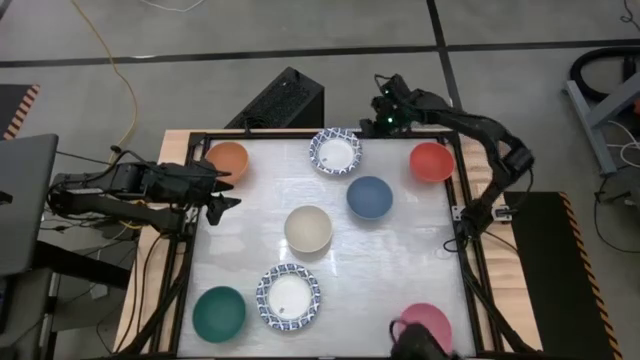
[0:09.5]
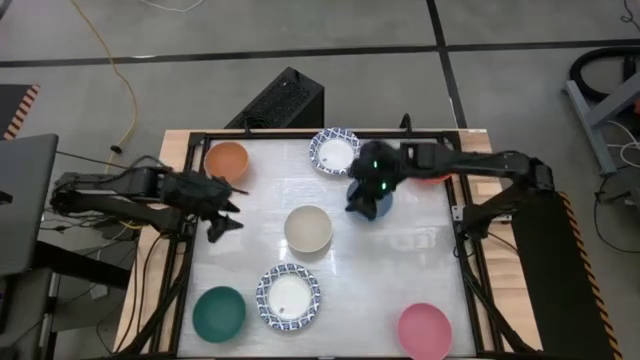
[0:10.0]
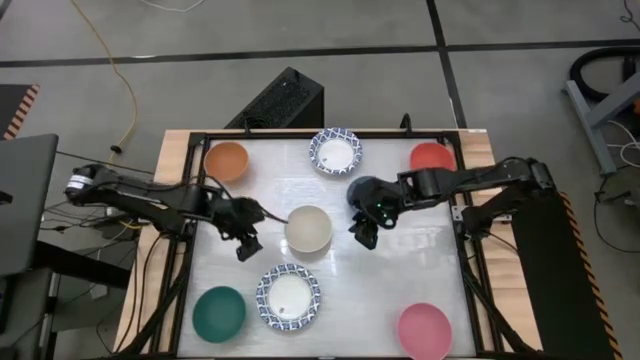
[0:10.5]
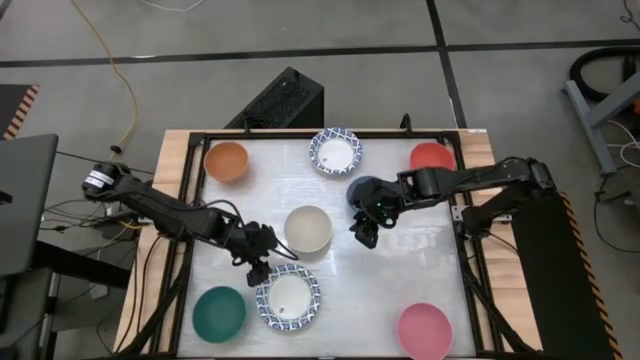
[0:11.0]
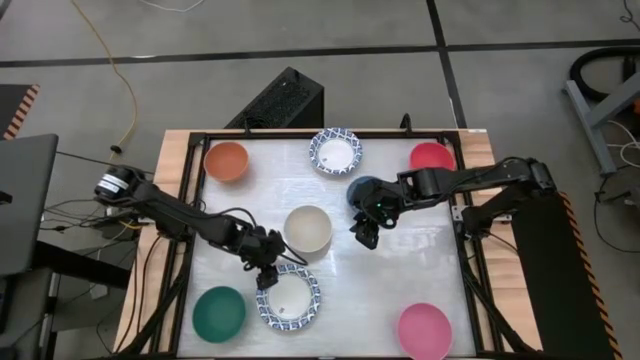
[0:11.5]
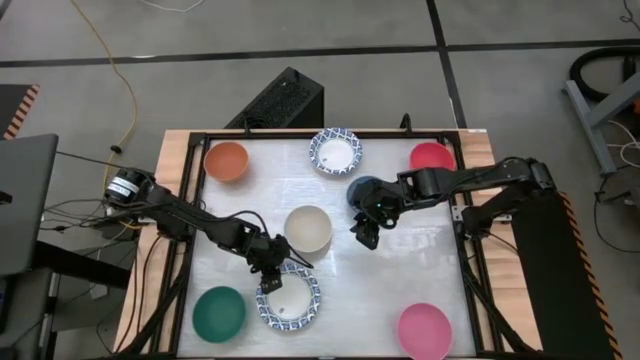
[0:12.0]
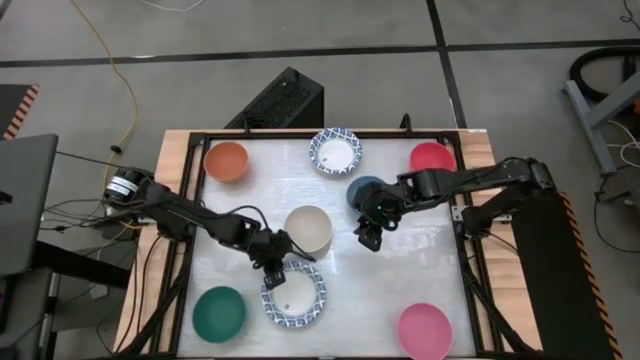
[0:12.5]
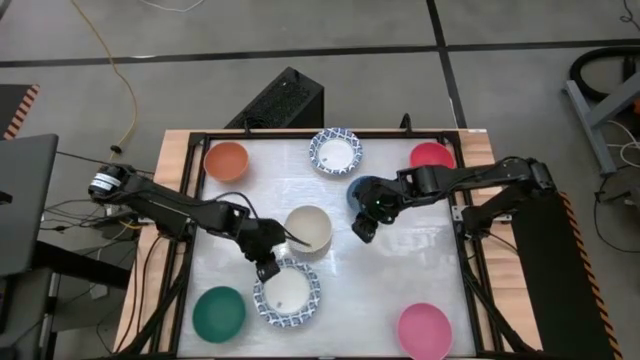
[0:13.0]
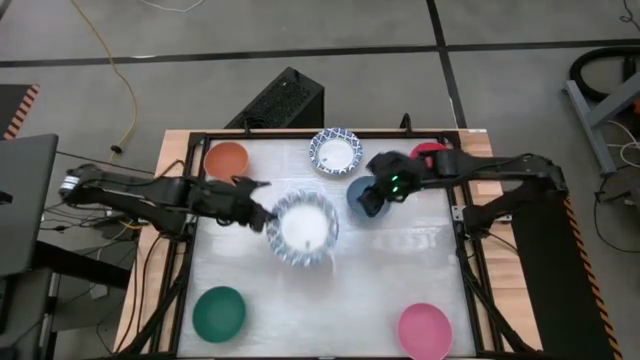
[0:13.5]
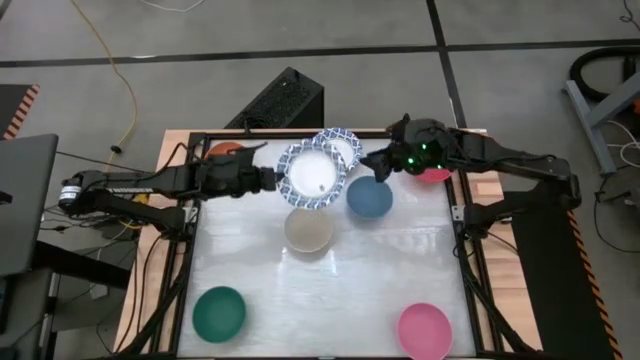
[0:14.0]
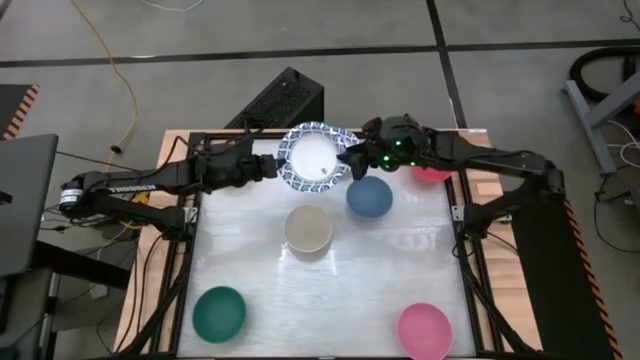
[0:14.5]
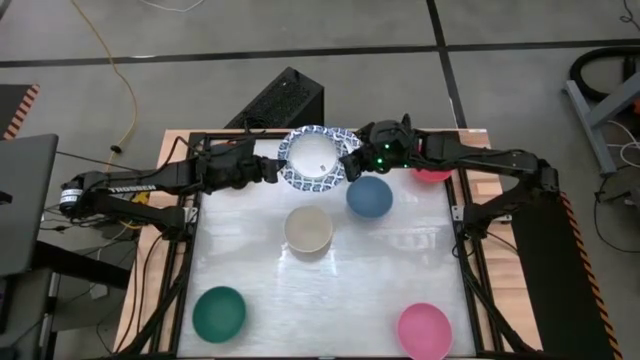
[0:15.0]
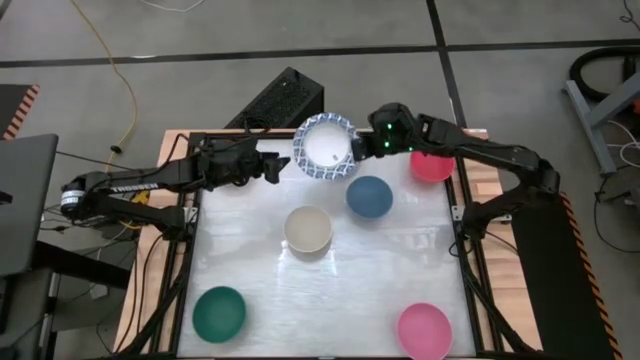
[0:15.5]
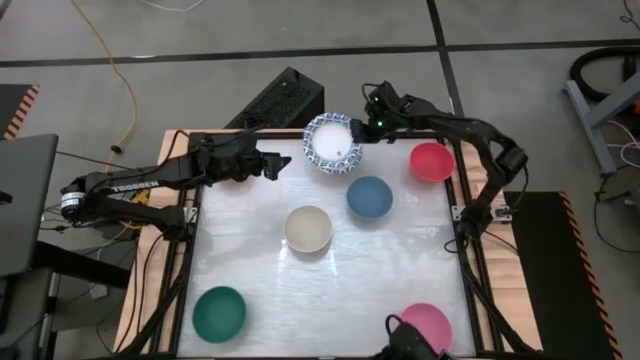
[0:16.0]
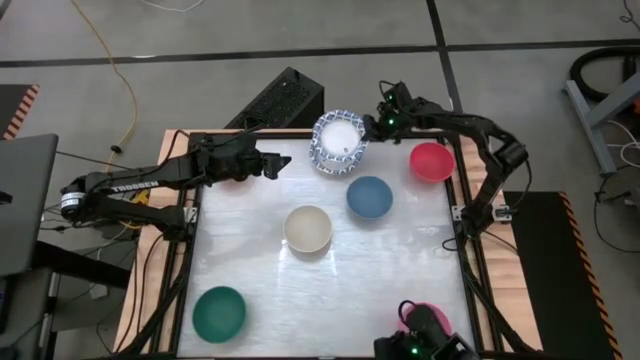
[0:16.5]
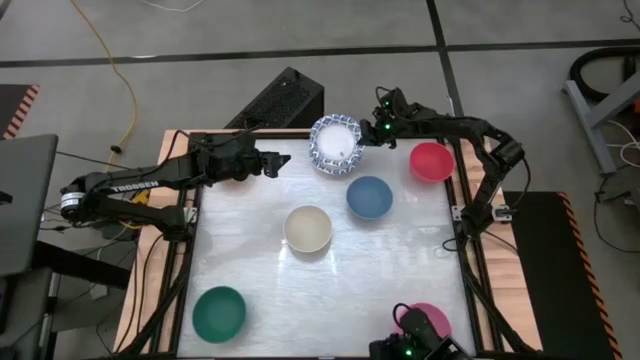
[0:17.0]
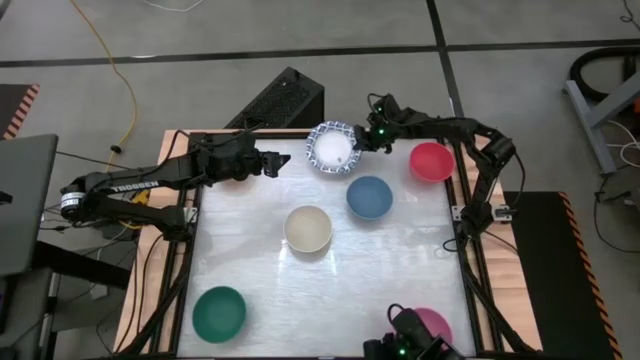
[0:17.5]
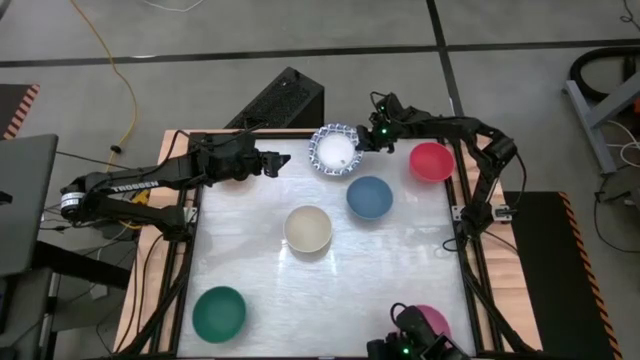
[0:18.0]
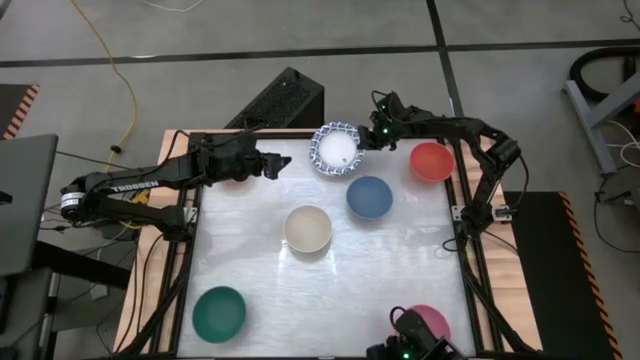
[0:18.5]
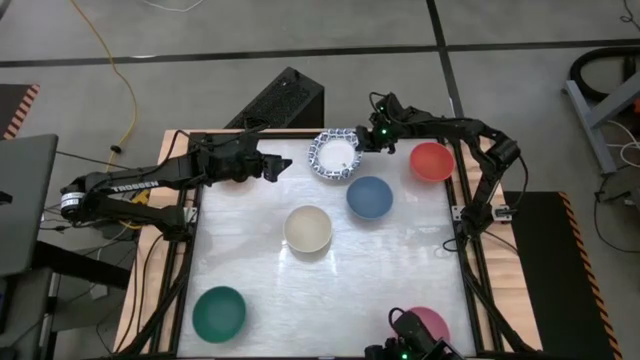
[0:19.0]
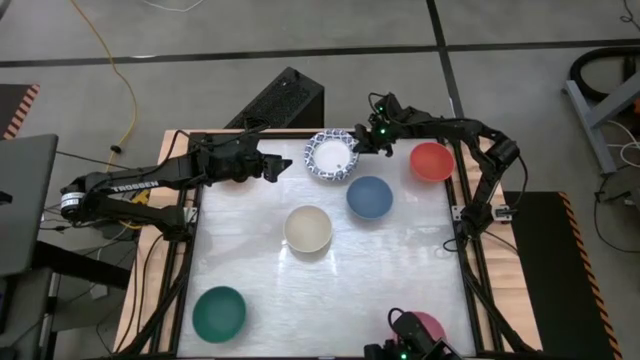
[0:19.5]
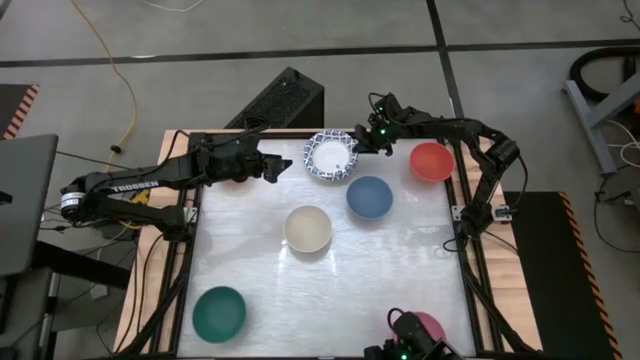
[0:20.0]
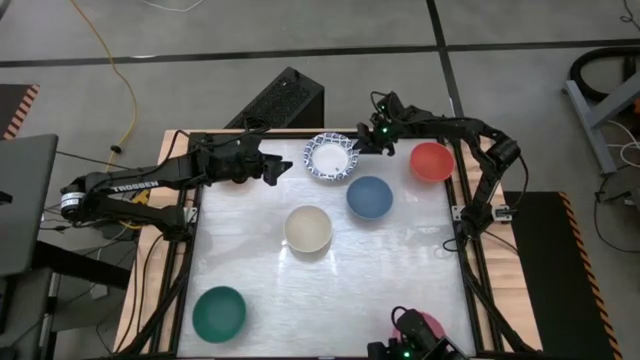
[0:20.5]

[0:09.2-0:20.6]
Stack the white and blue bowl on top of the white and blue bowl

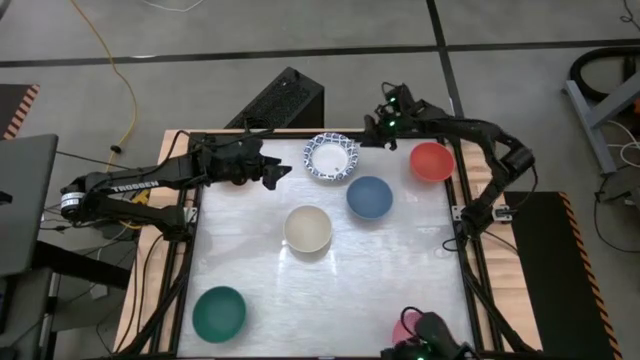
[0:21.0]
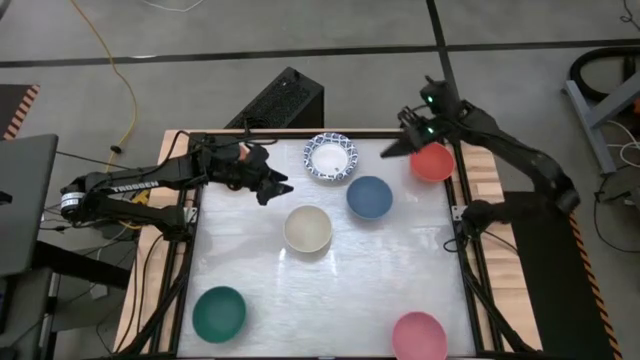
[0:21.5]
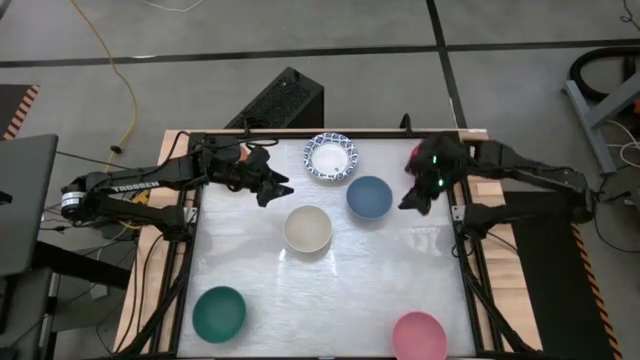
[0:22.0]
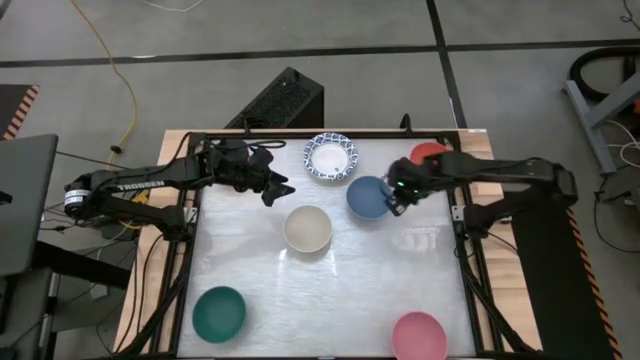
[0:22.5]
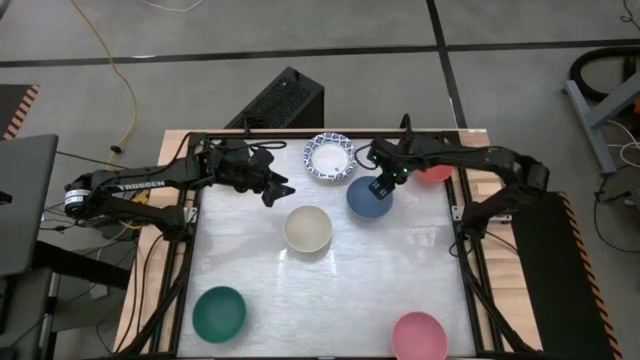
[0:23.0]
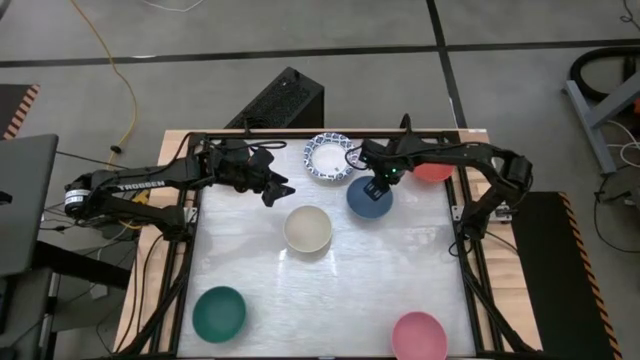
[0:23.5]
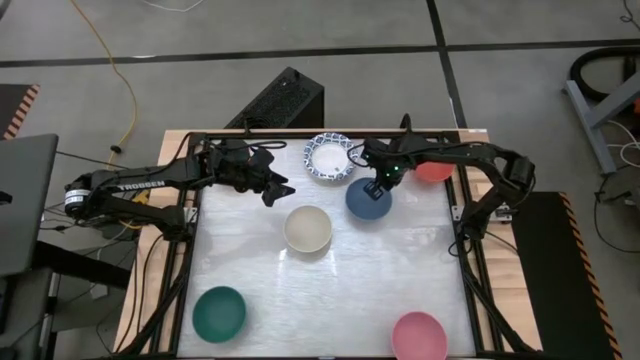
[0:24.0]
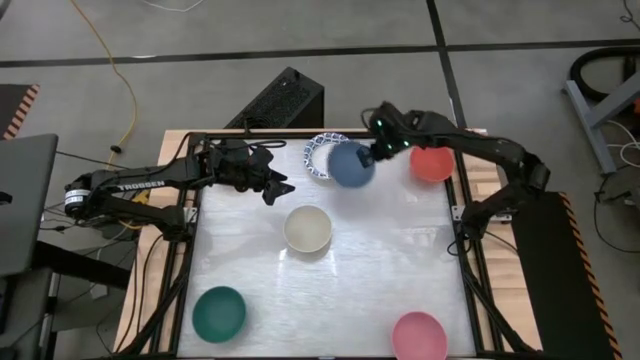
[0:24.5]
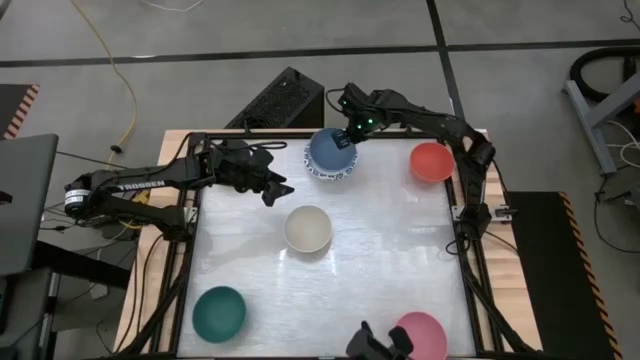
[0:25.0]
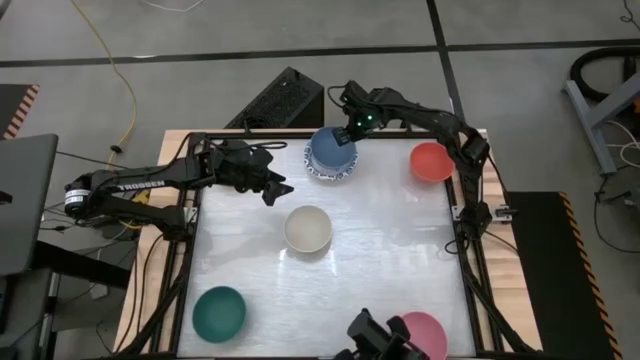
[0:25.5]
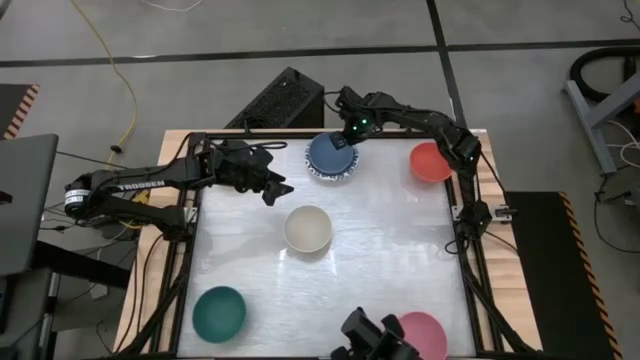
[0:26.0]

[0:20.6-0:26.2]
Stack the blue bowl on top of the white-blue bowl

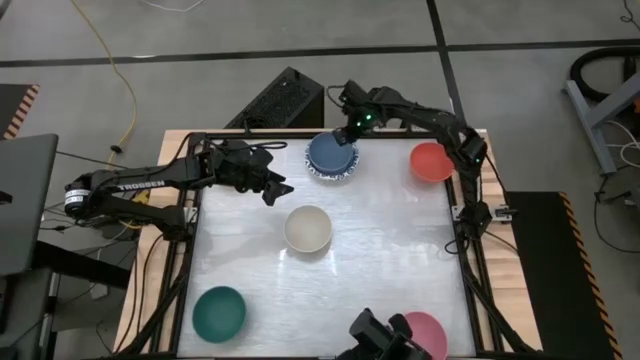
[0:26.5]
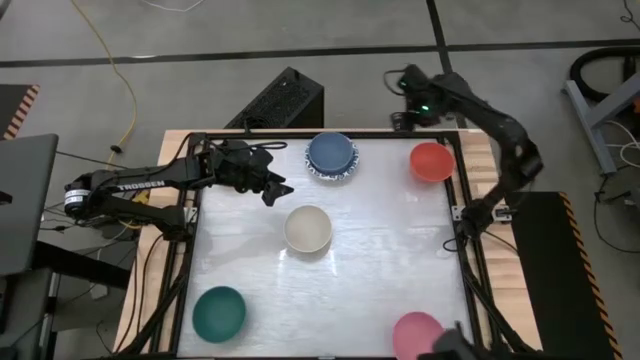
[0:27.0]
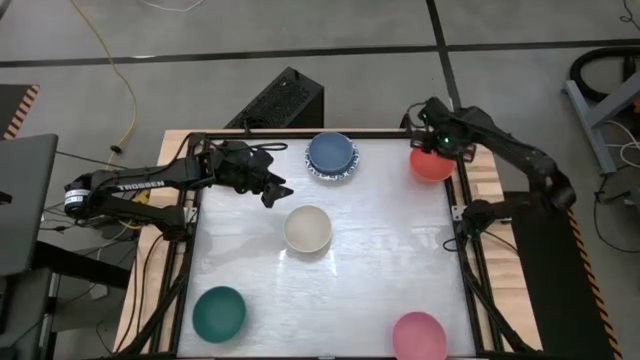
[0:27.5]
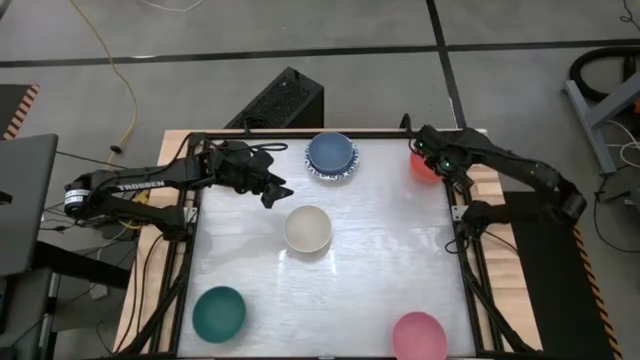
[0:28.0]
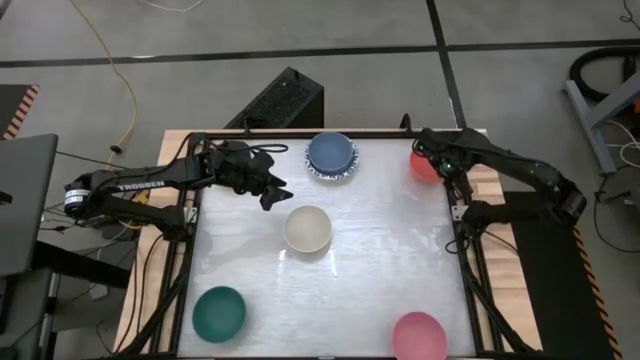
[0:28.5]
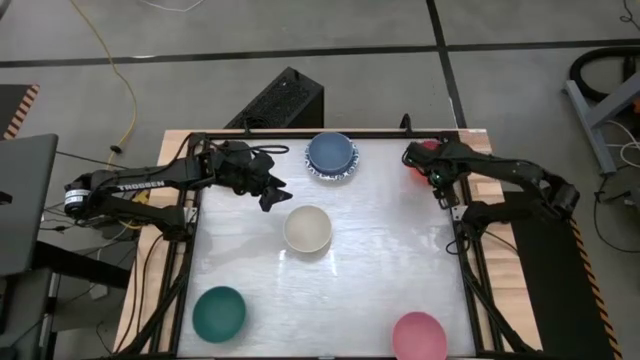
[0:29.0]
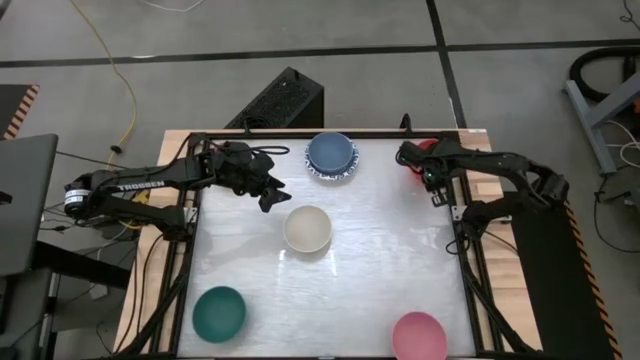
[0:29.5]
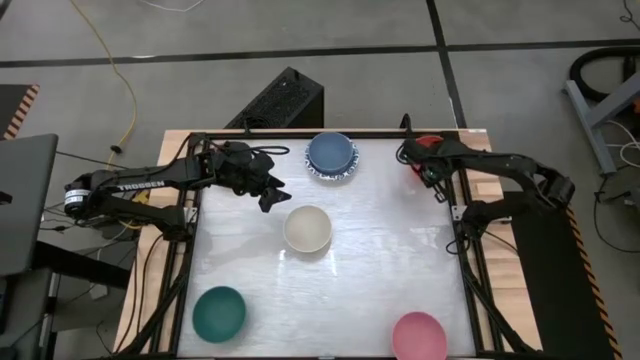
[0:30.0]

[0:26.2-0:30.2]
Stack the orange bowl on top of the blue bowl

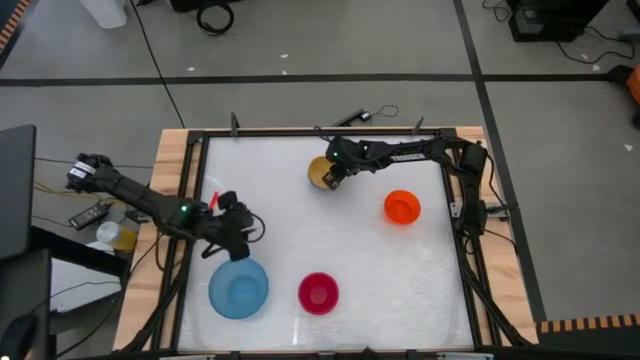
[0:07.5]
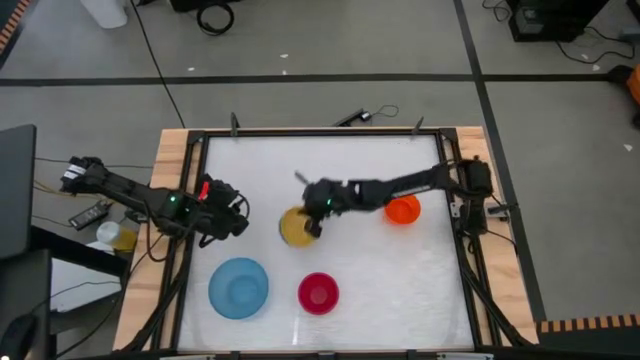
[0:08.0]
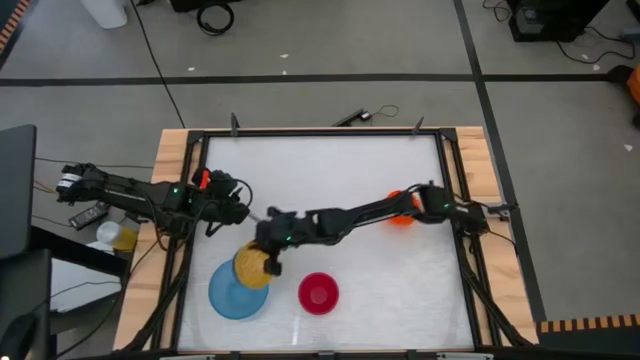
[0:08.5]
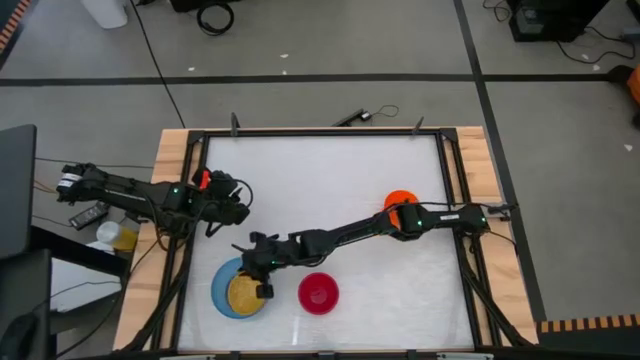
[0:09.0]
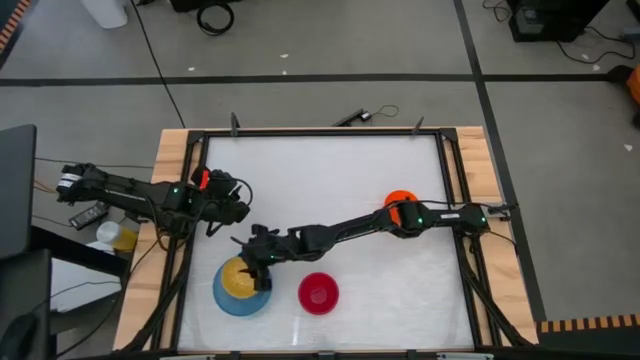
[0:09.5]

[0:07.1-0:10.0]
Stack the yellow bowl on top of the blue bowl
